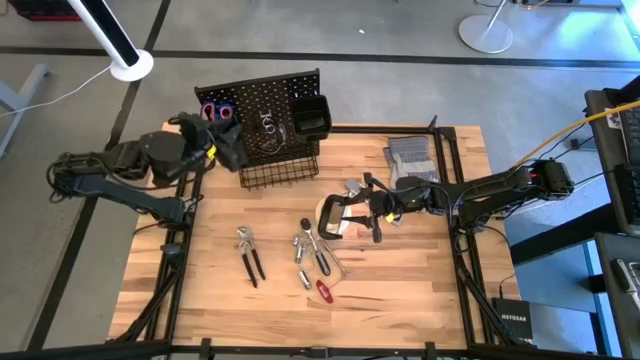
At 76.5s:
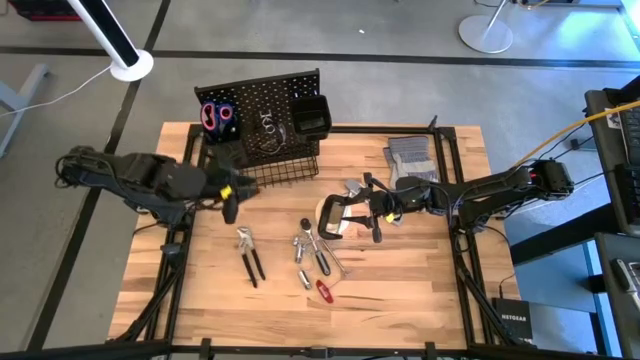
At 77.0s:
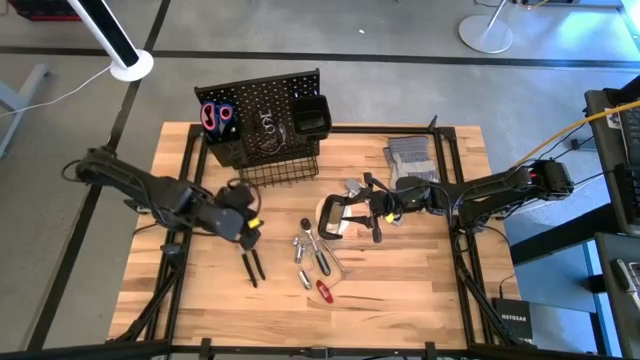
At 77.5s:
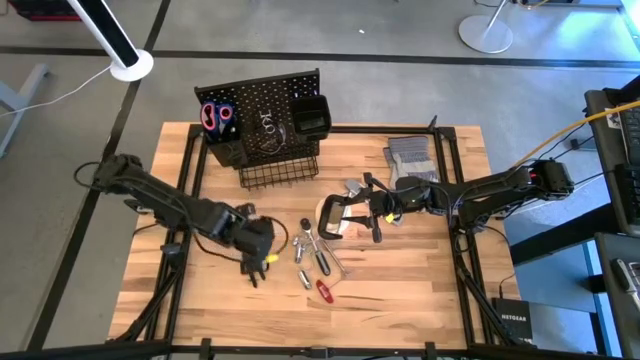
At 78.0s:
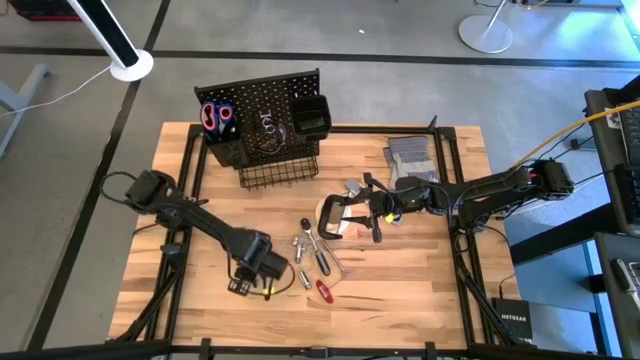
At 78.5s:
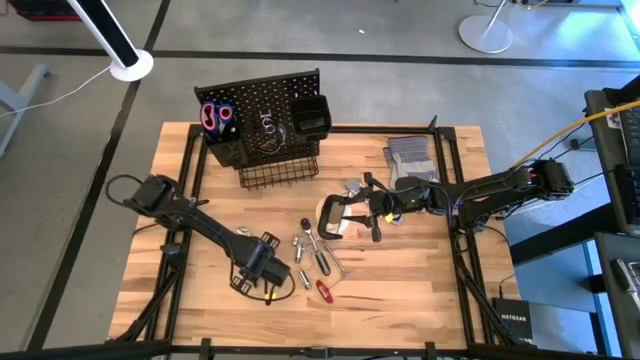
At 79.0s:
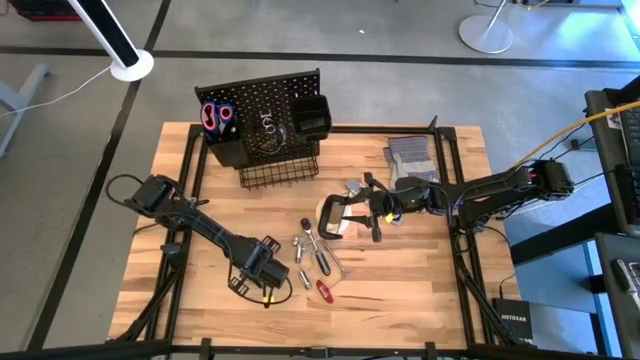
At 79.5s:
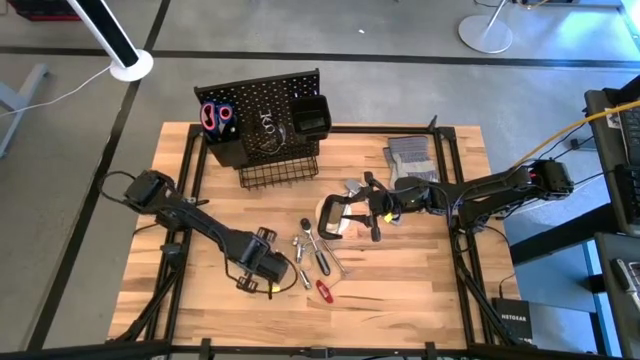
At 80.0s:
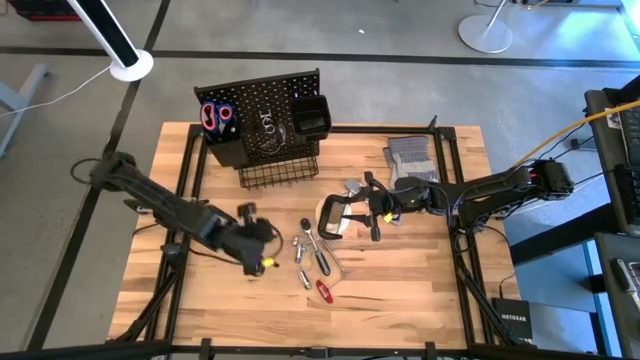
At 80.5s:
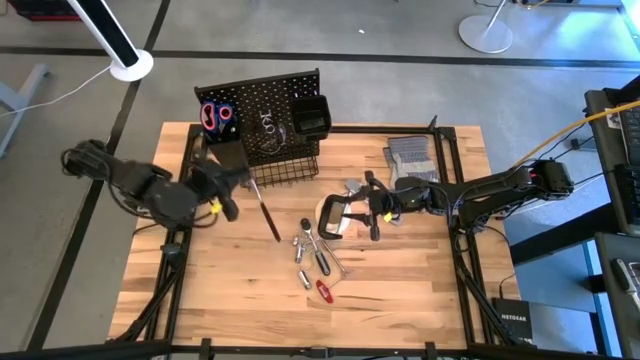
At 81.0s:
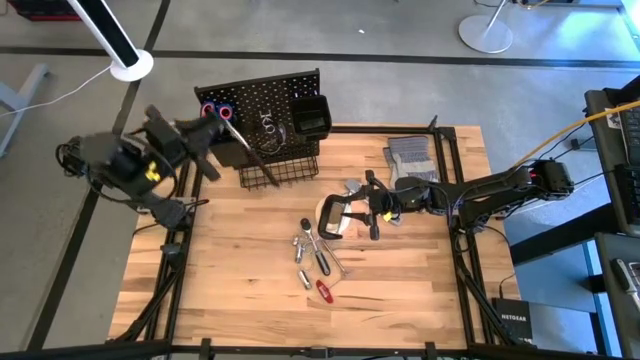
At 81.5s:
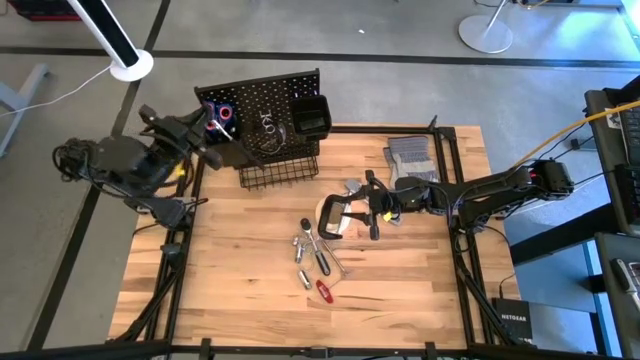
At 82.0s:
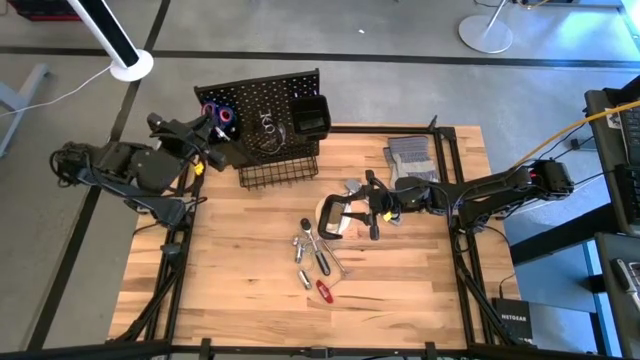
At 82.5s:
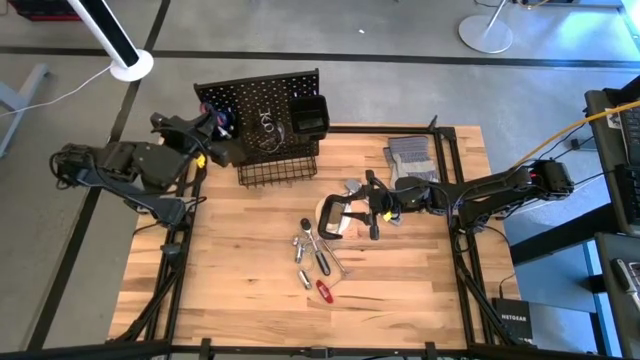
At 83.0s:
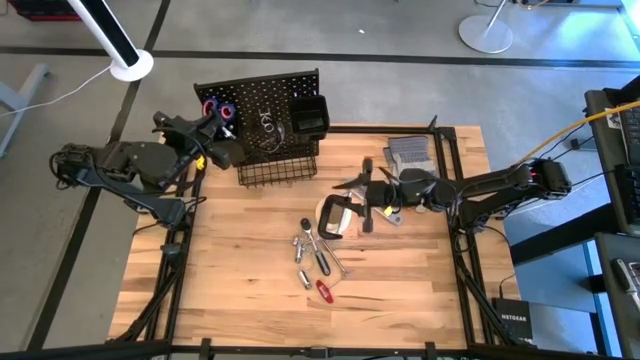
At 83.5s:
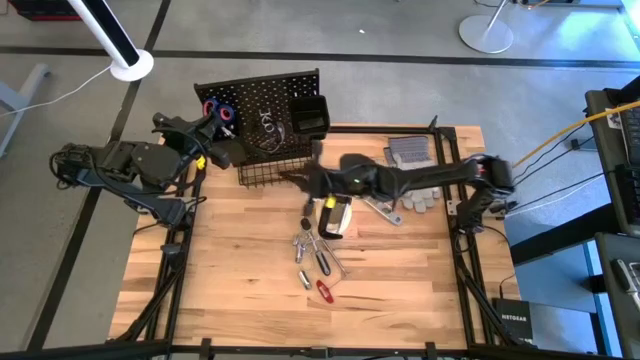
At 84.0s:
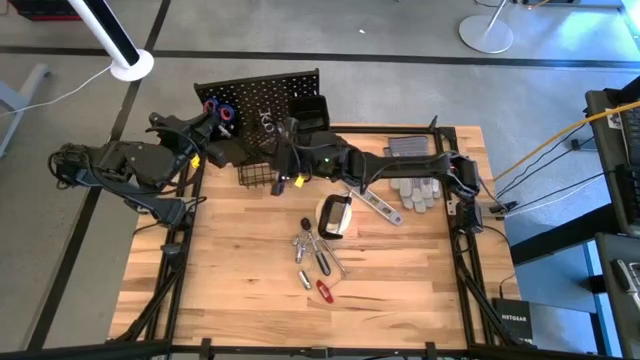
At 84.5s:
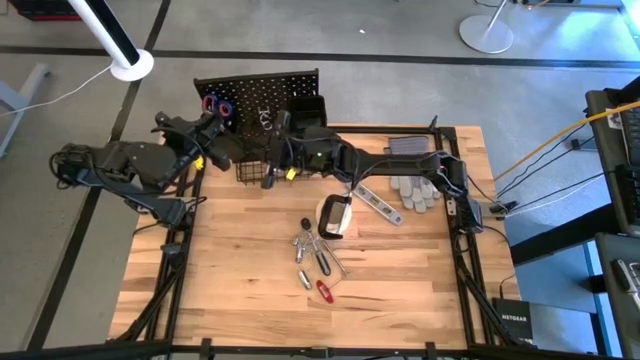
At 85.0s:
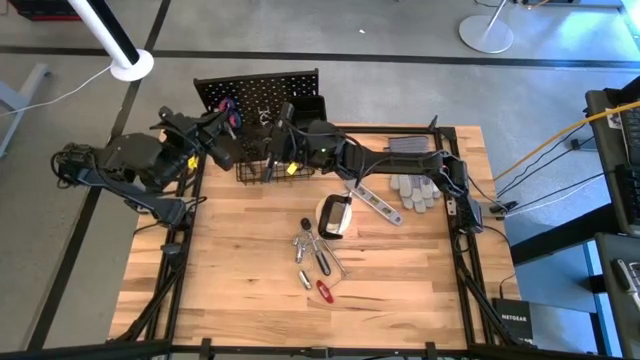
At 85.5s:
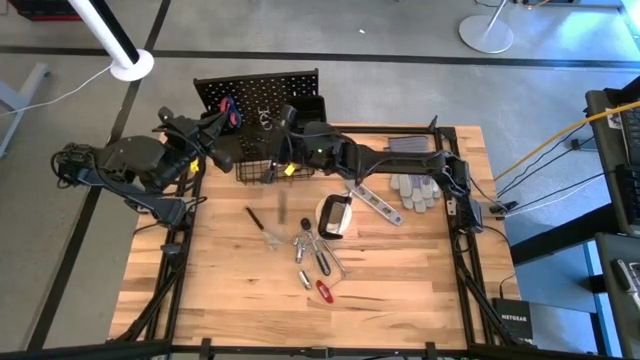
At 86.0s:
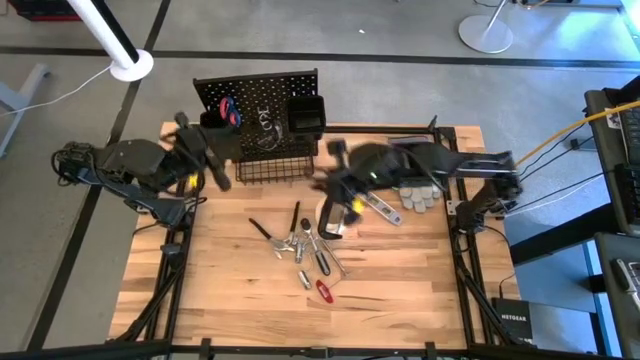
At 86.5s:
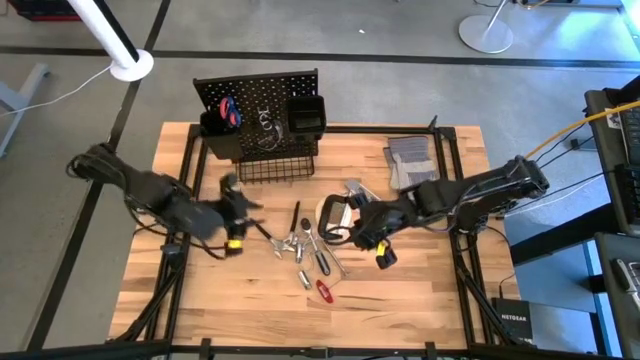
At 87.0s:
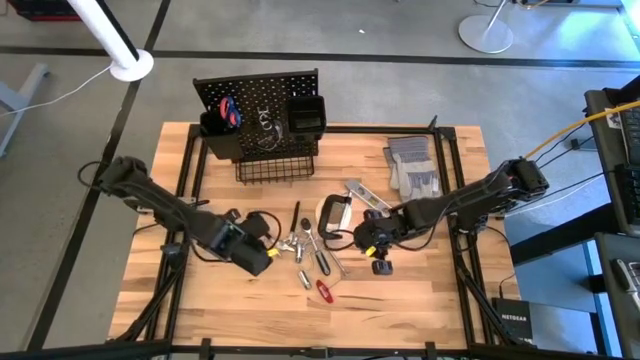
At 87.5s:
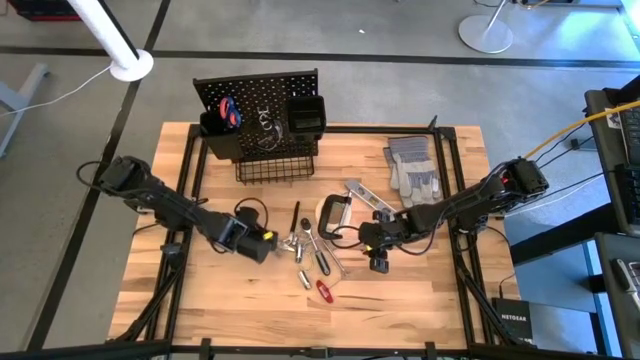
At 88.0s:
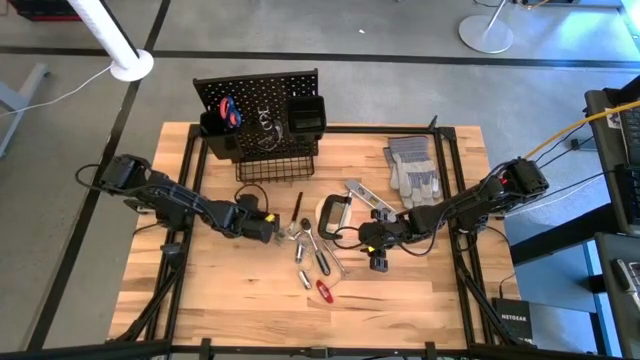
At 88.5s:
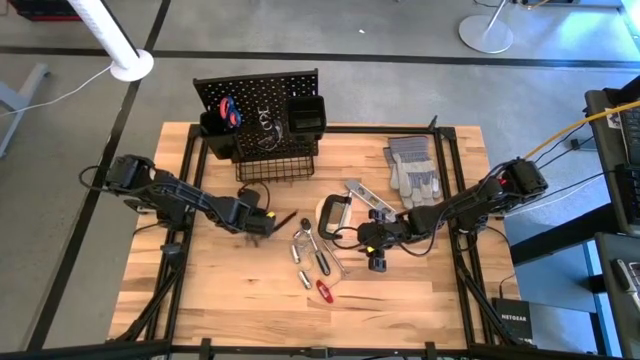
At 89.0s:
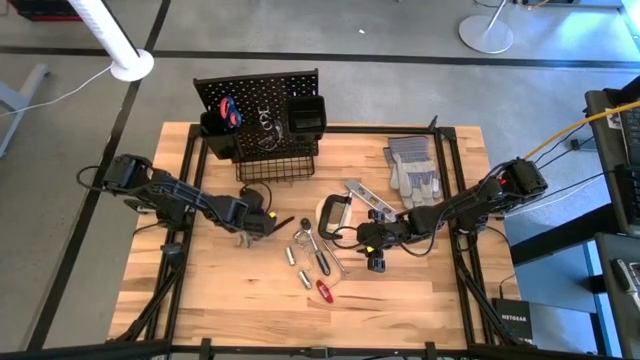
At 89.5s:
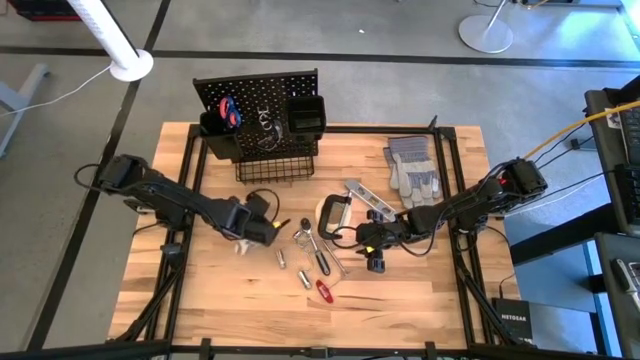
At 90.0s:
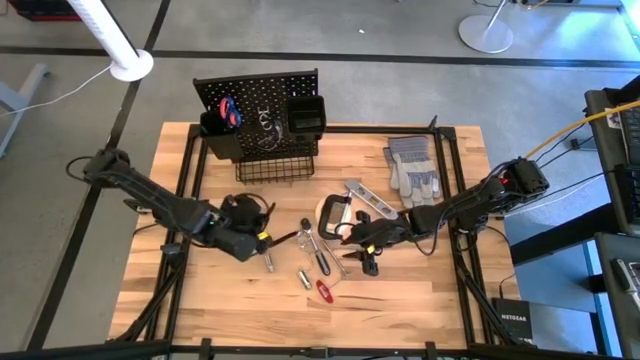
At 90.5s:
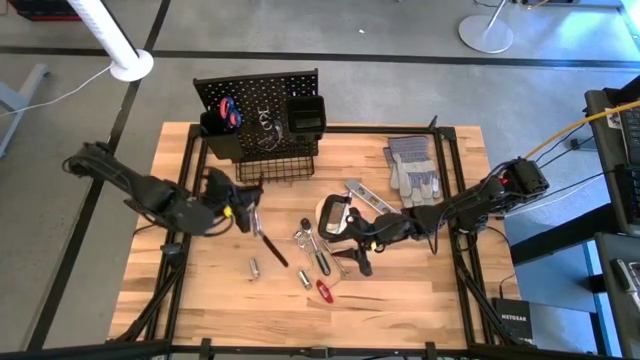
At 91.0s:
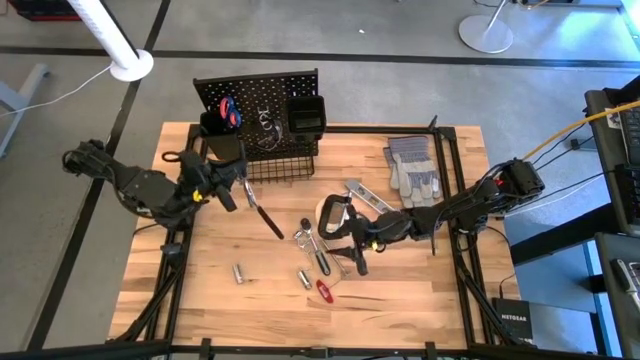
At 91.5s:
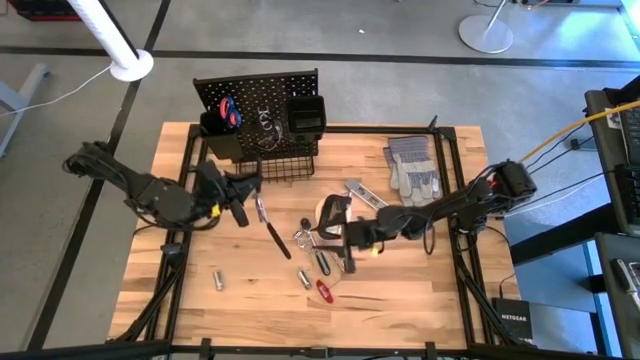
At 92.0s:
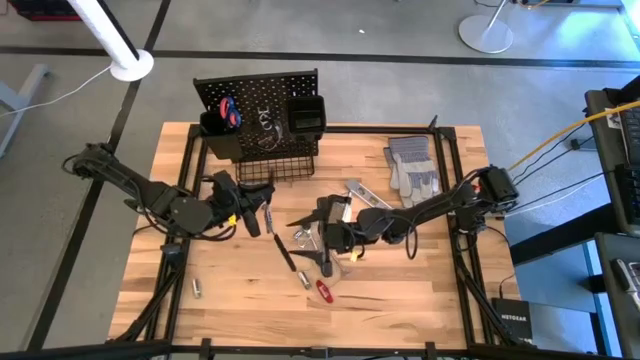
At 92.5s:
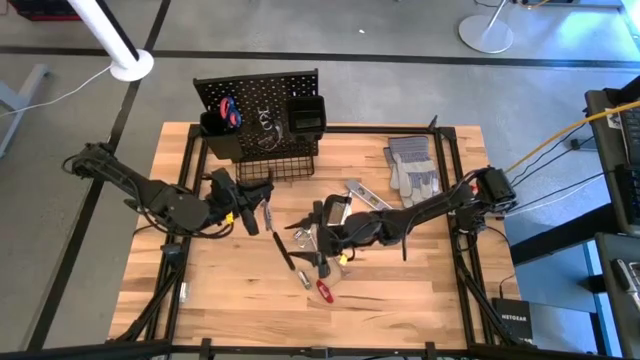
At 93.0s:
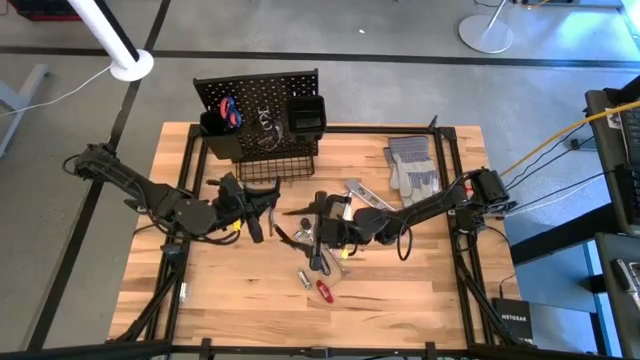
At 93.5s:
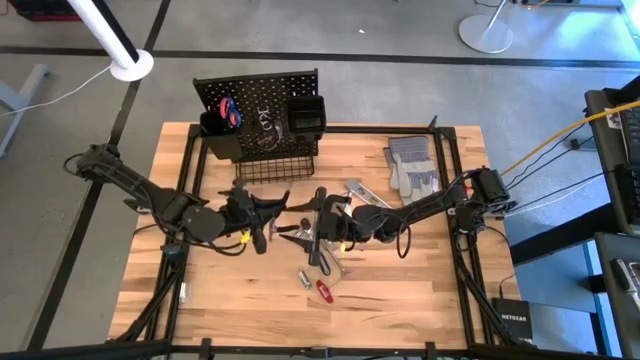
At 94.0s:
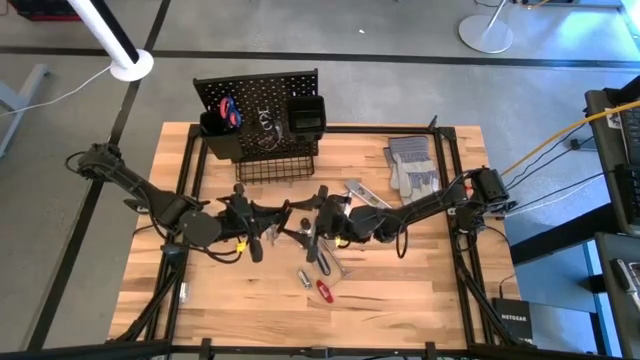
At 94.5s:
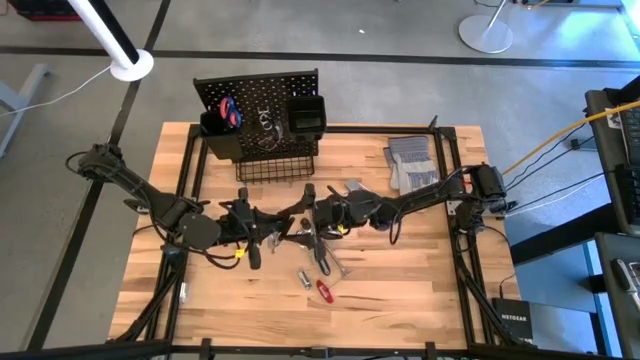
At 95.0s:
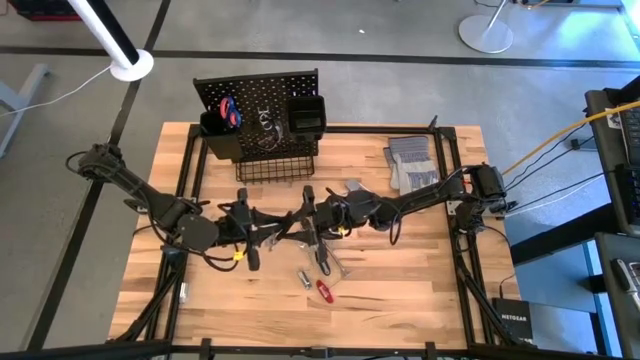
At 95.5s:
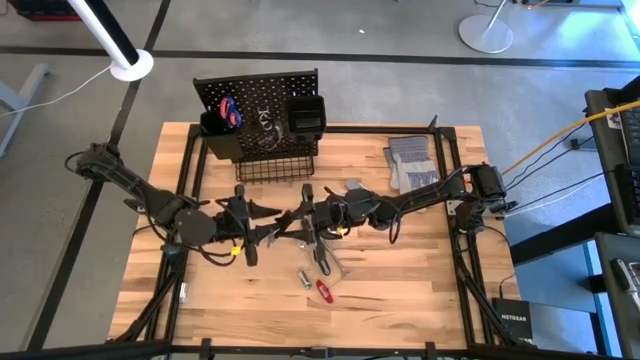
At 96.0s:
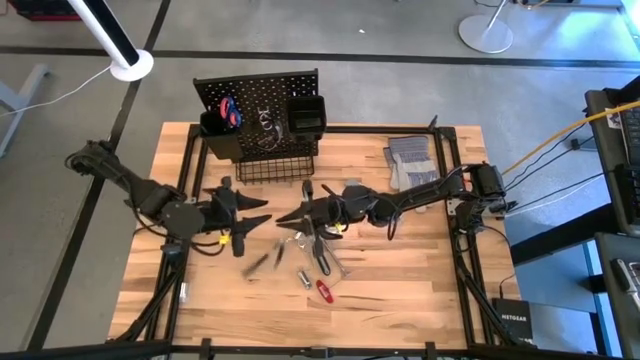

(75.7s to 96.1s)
Task: Hang tools onto peg board
Put the black adjustable pliers into the left black bin on the pegboard
